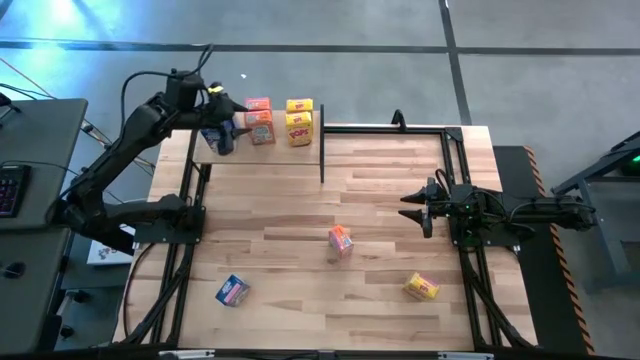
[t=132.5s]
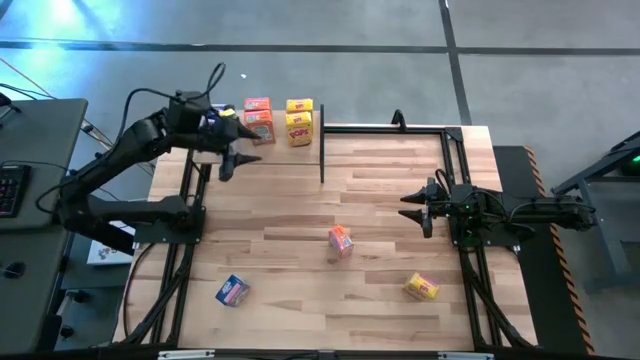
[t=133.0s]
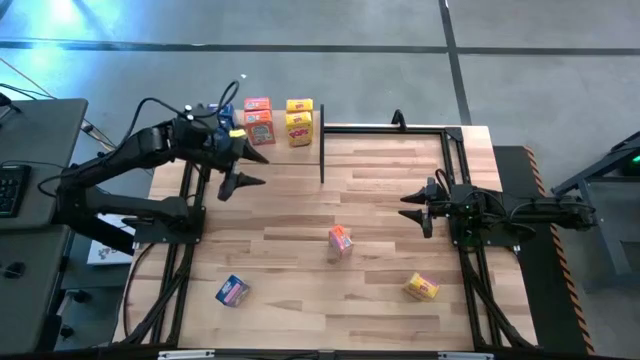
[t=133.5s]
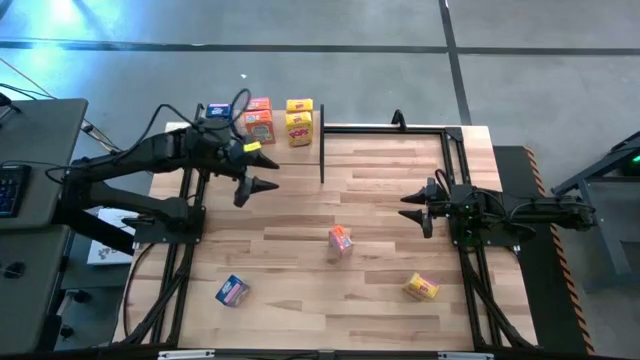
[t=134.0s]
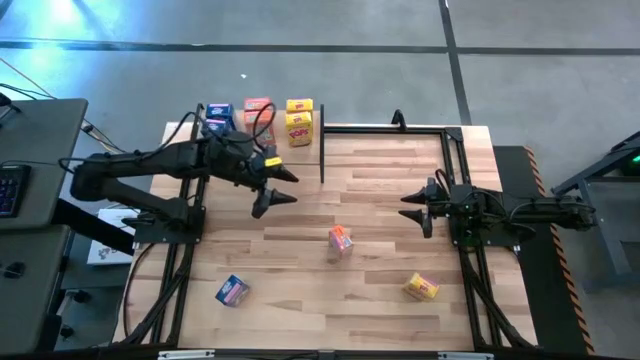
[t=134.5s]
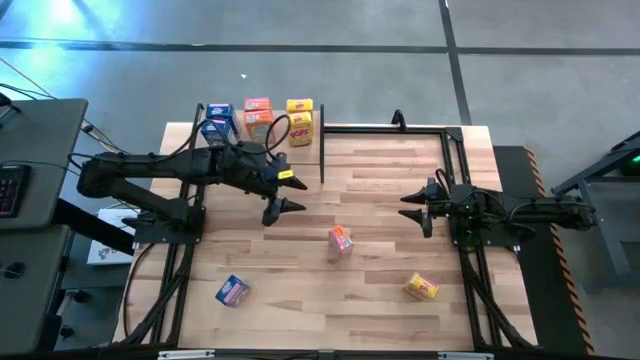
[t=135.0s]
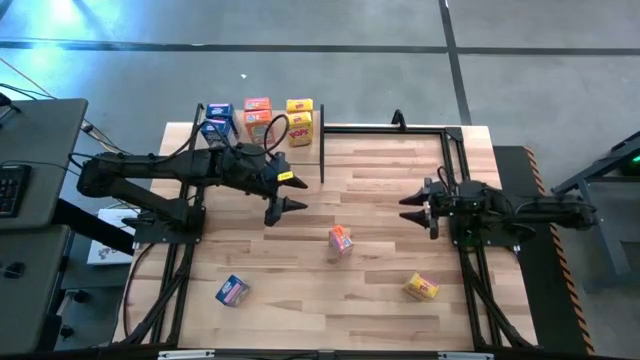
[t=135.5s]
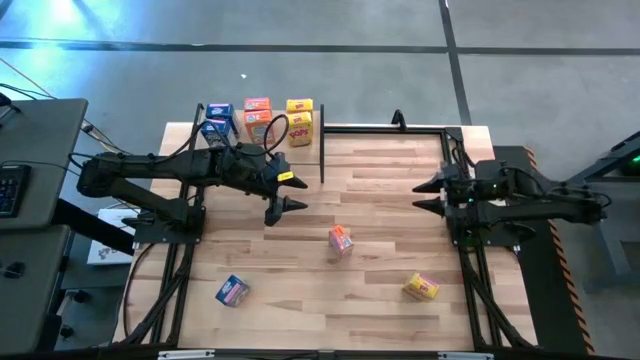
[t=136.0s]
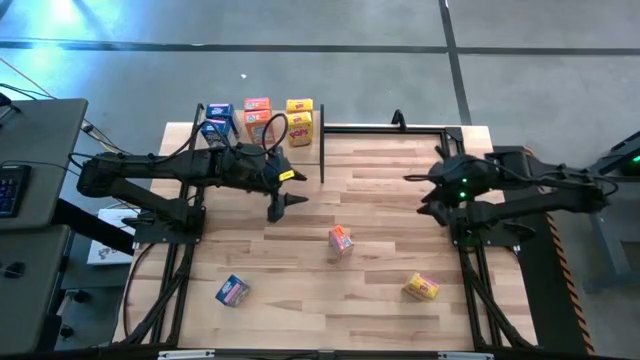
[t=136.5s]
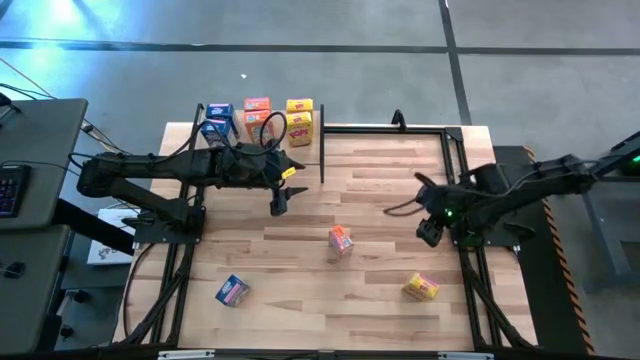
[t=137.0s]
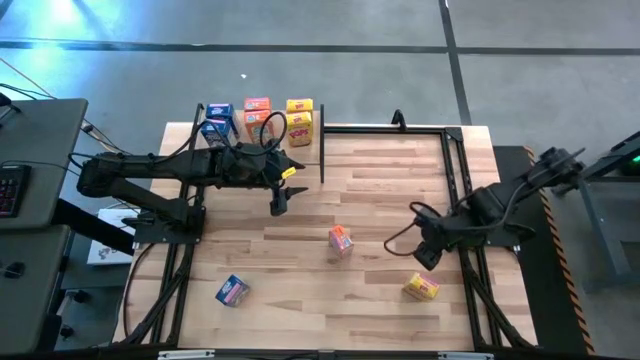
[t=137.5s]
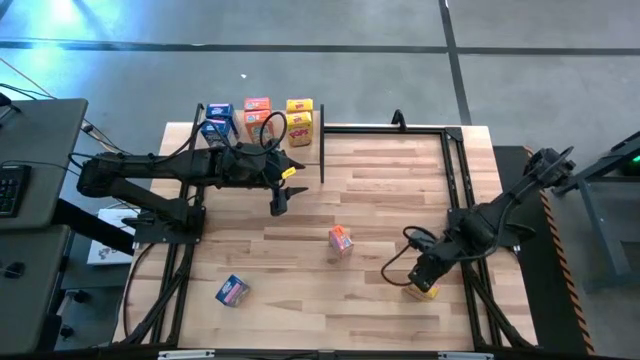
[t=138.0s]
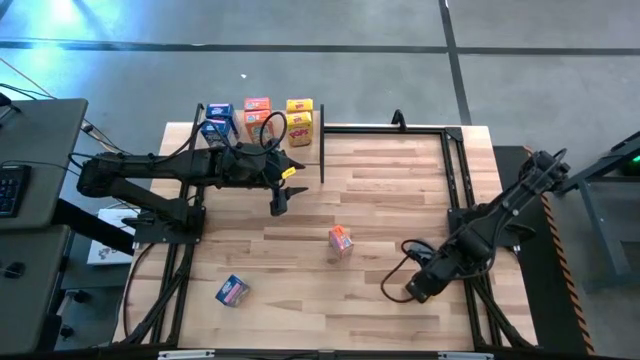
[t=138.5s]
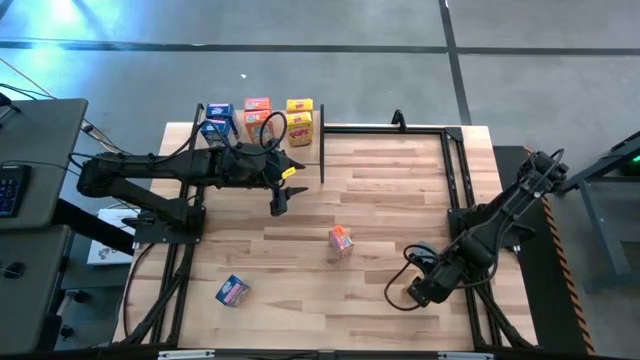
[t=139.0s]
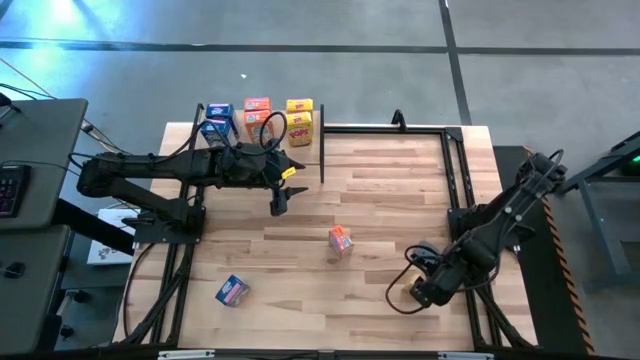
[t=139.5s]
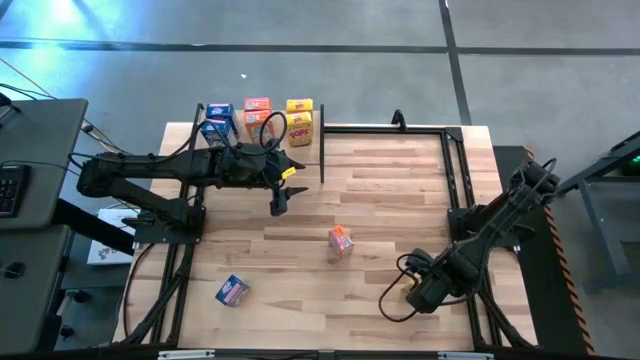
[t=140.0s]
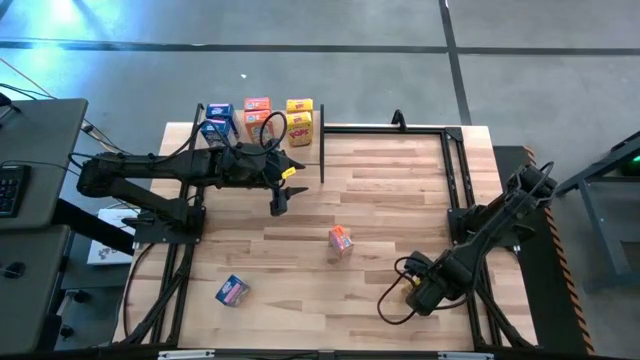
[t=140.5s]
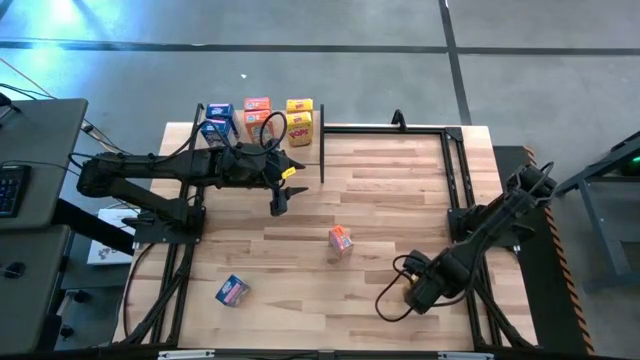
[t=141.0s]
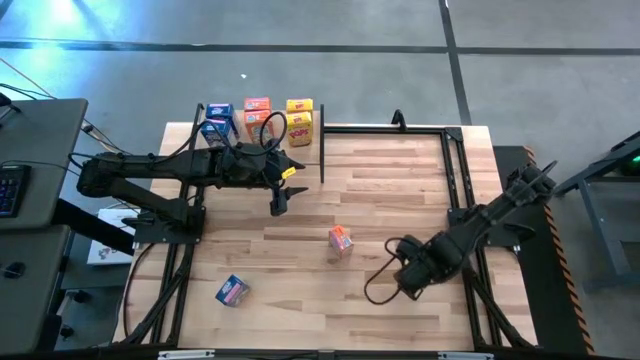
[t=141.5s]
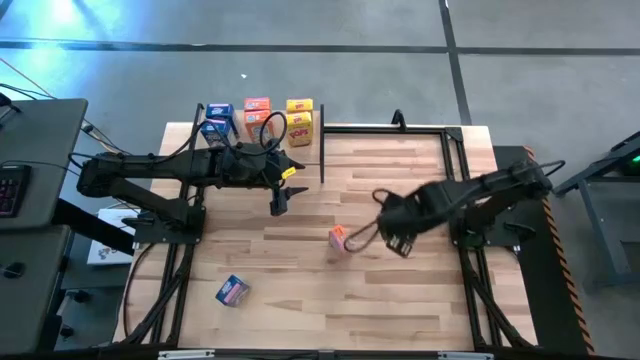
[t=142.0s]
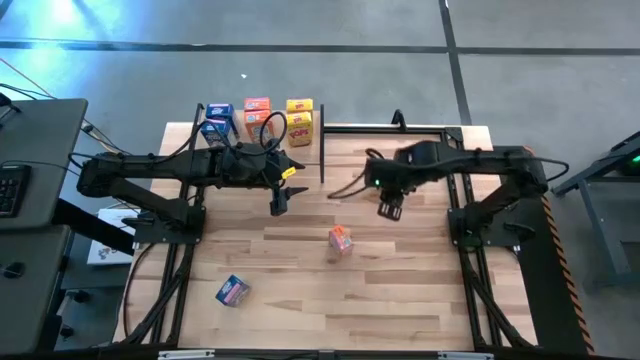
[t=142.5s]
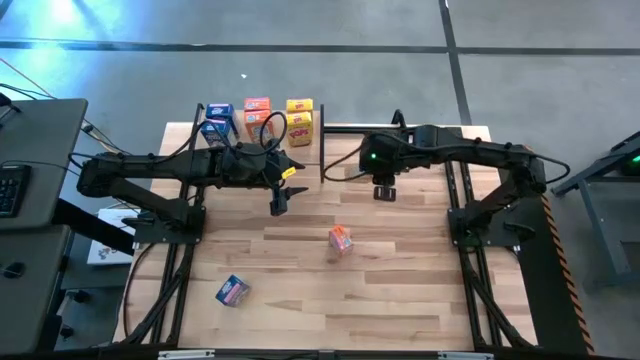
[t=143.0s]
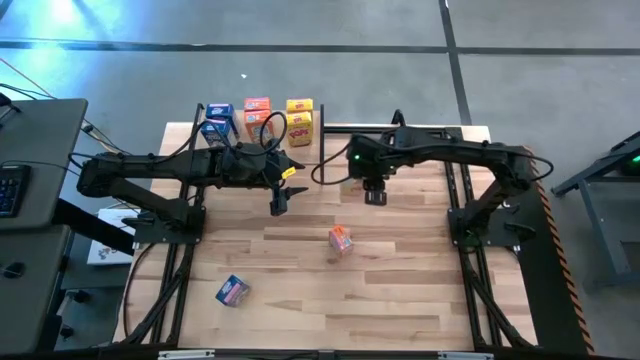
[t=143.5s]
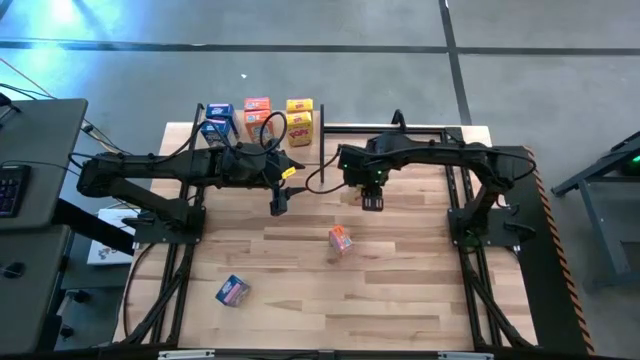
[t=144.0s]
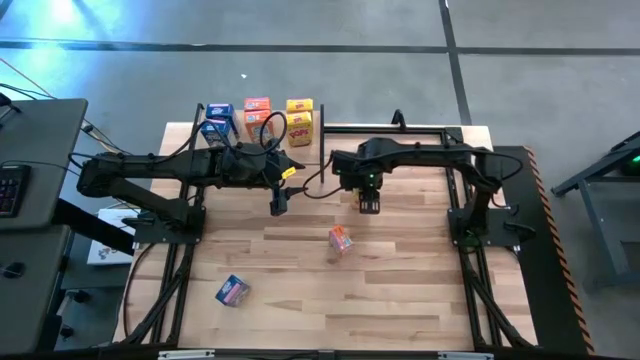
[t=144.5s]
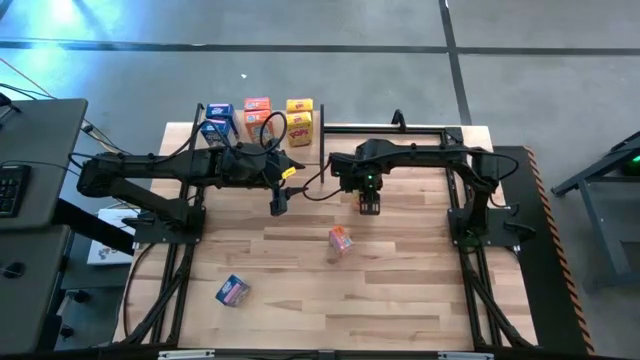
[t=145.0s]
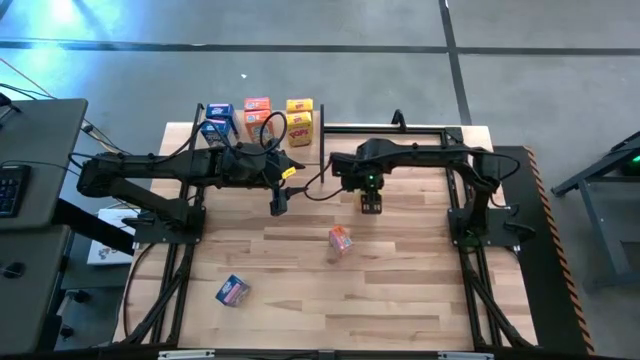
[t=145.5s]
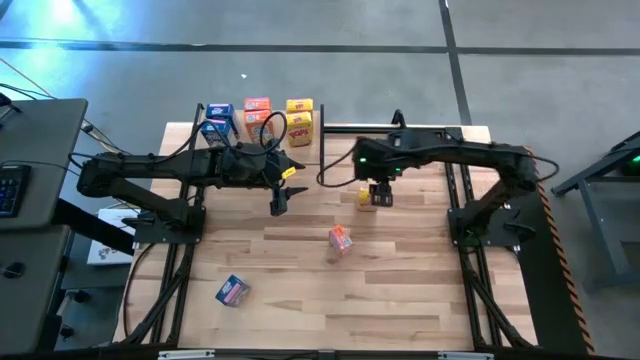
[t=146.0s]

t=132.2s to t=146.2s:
Task: Stack cereal on shelf
Put the yellow cereal box on the shelf aligned with the other yellow cereal boxes

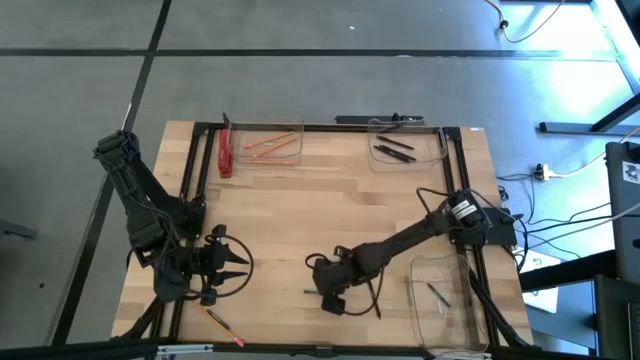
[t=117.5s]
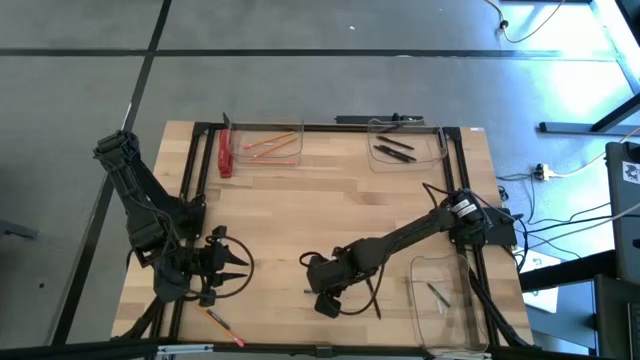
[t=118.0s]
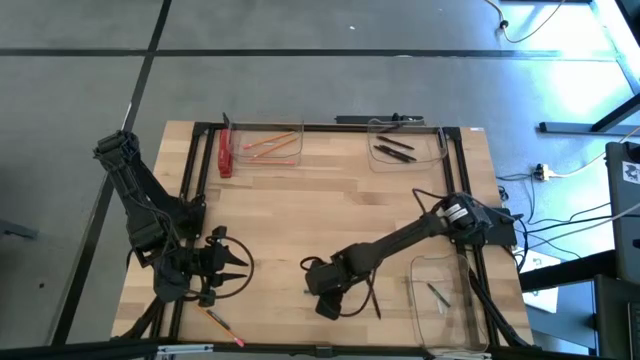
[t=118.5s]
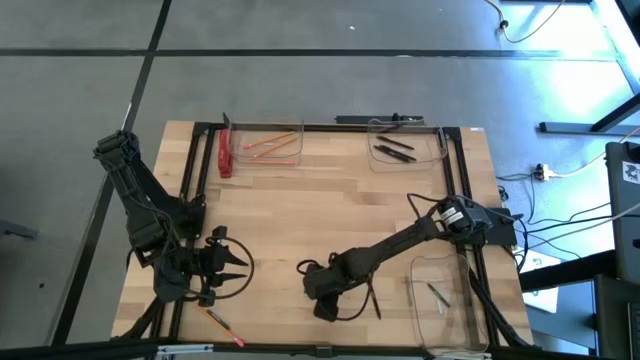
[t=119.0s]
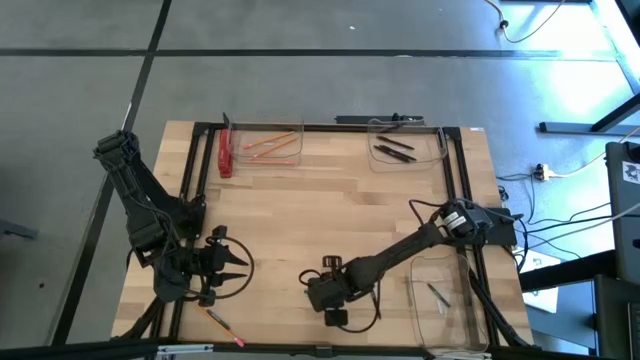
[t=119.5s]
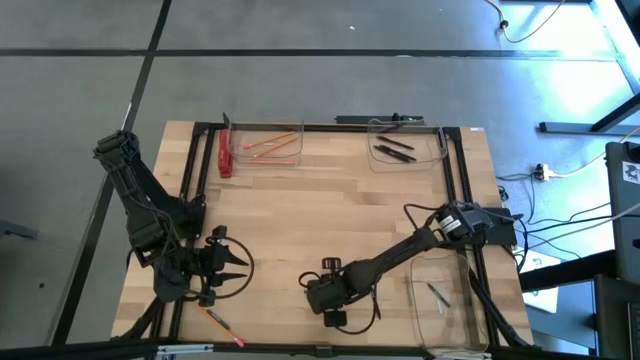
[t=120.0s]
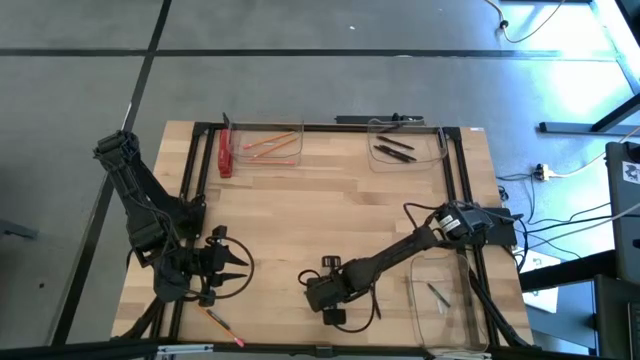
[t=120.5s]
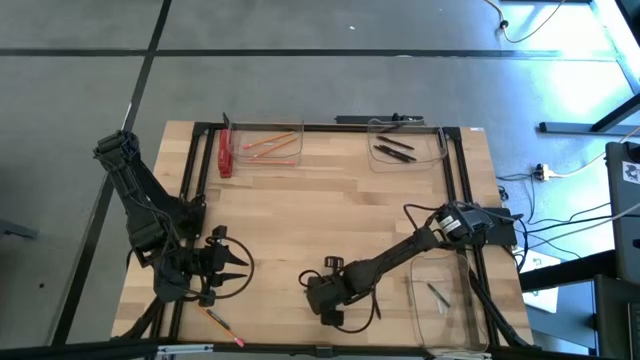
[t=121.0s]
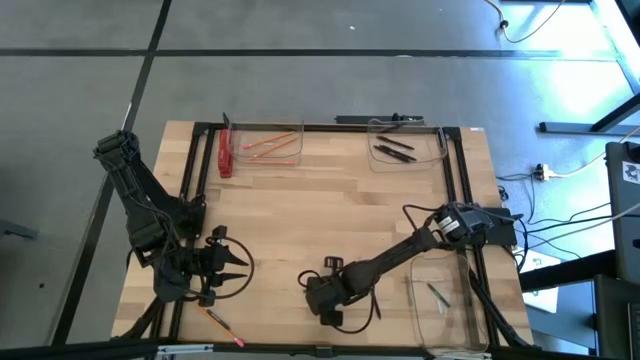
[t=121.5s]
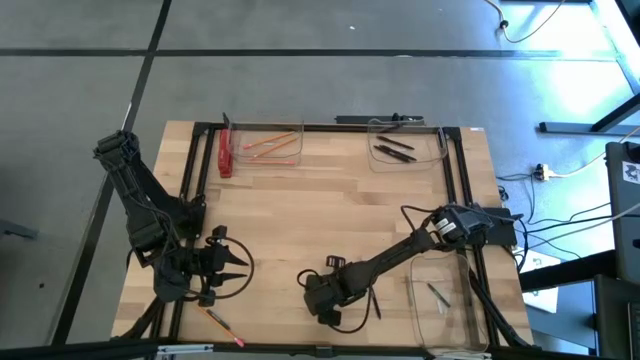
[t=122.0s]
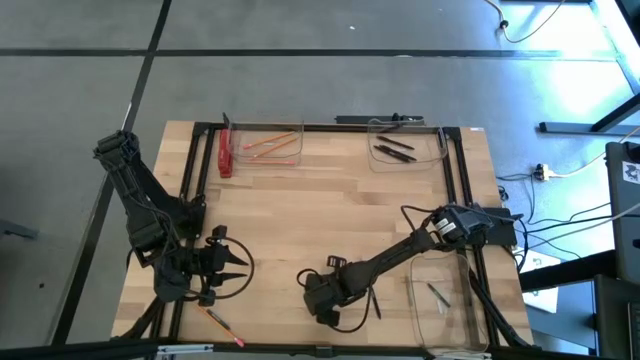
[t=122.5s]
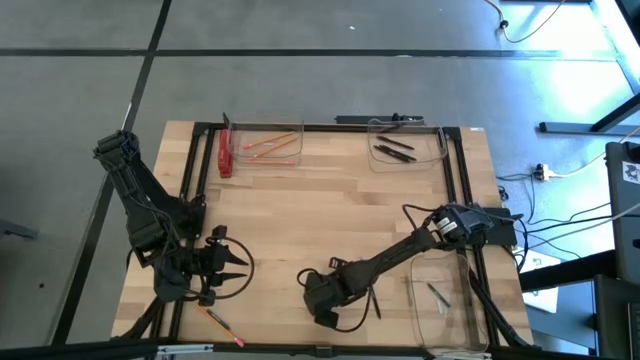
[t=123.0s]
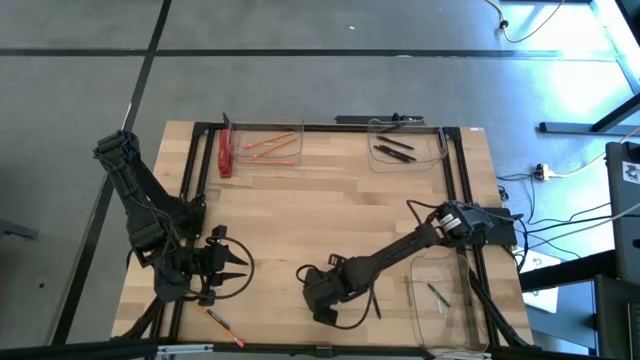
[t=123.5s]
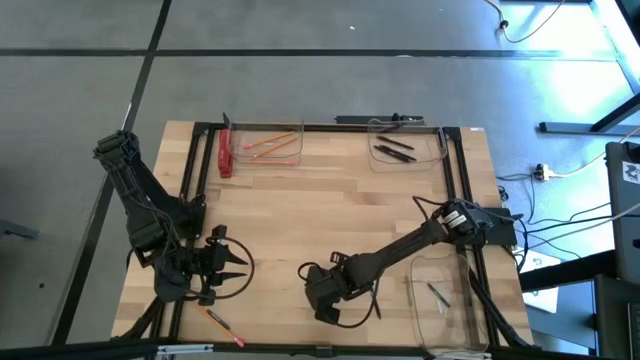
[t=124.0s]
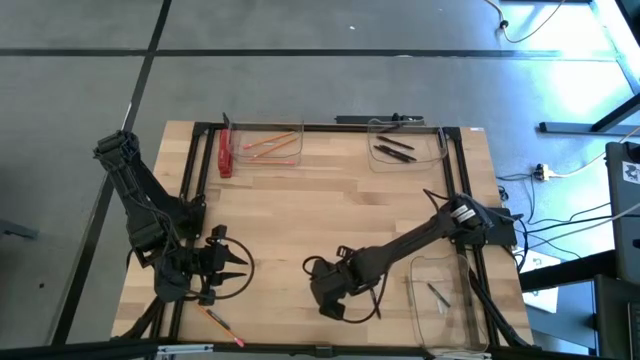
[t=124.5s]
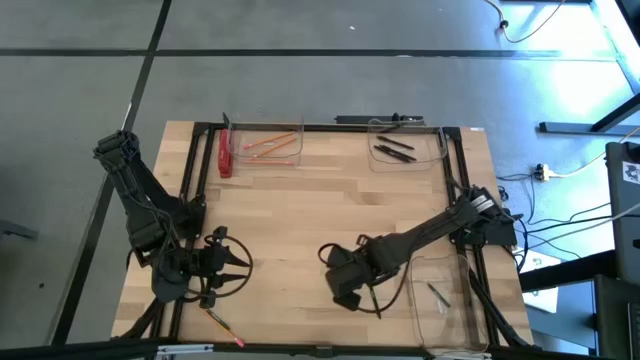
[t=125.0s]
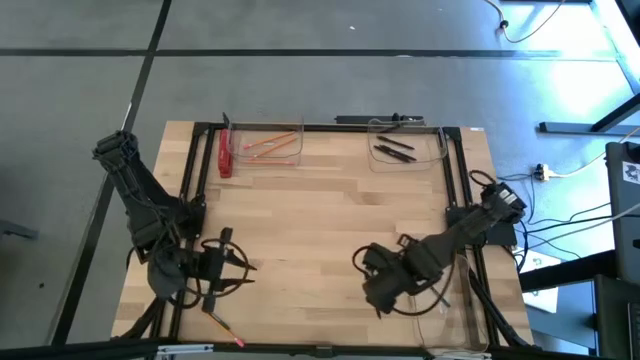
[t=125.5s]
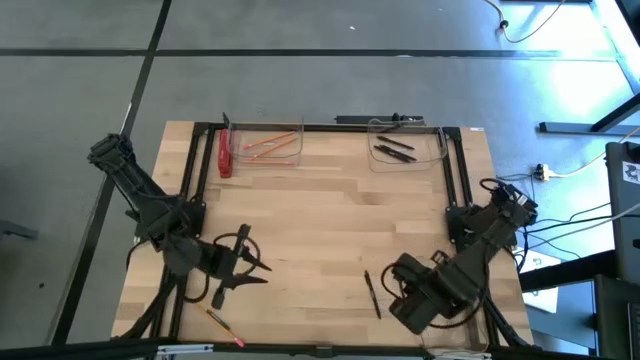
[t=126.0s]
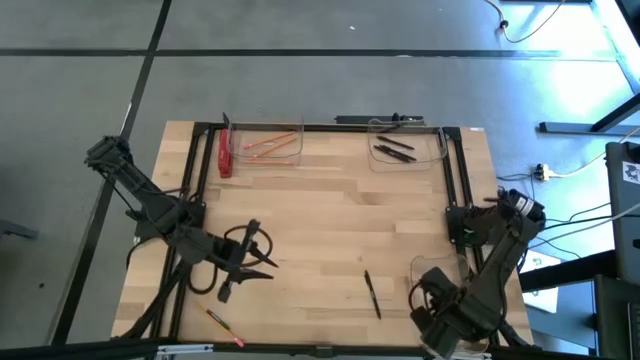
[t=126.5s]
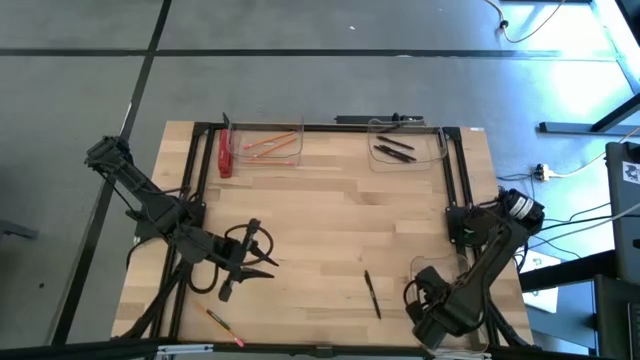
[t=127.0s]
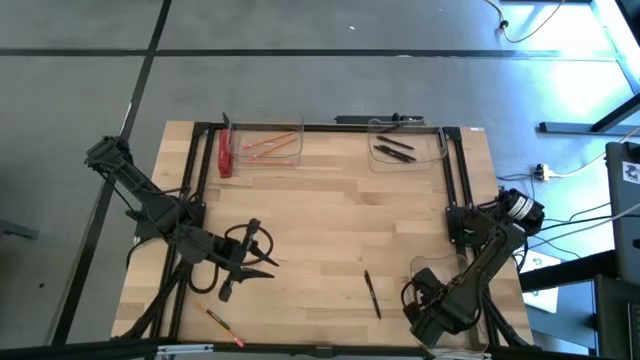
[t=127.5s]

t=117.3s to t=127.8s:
Task: Sort crayons/erasers/pens/pencils in bins
Put the right green crayon into the bottom transparent bin
